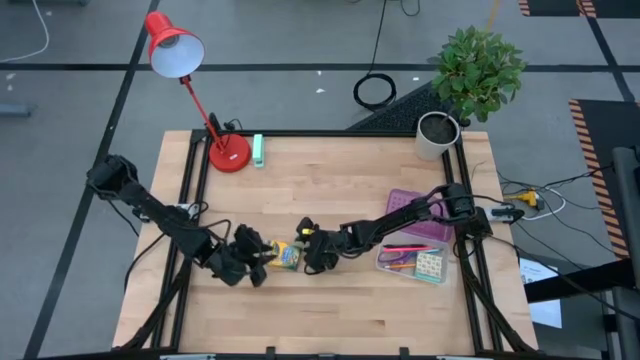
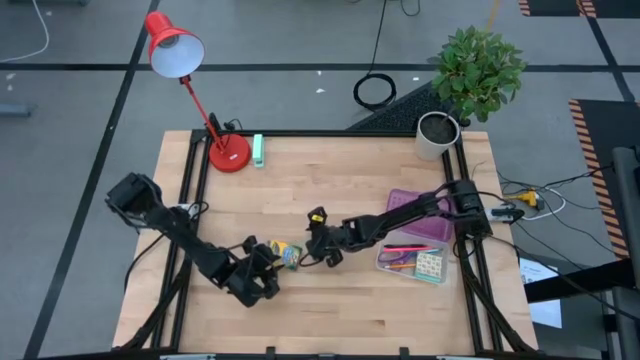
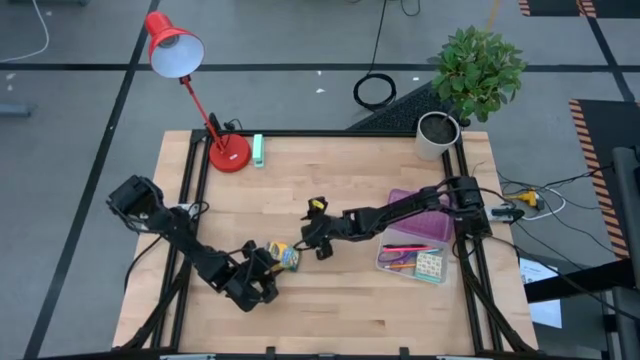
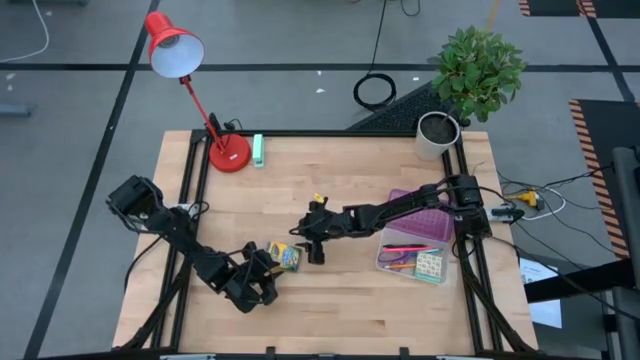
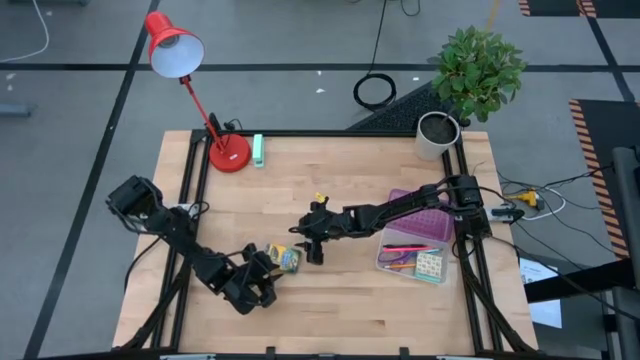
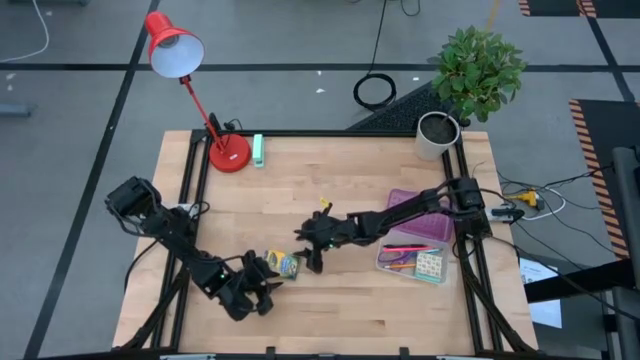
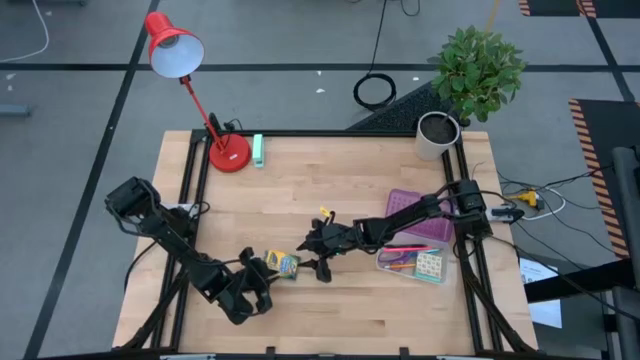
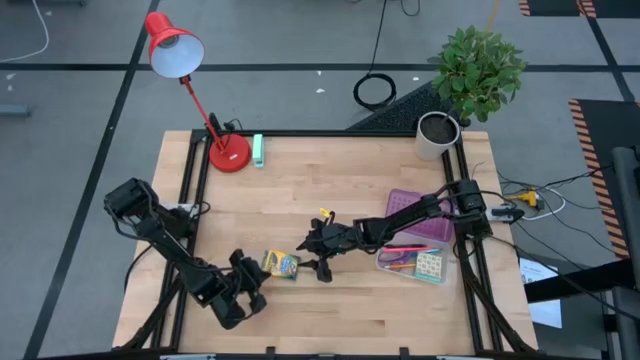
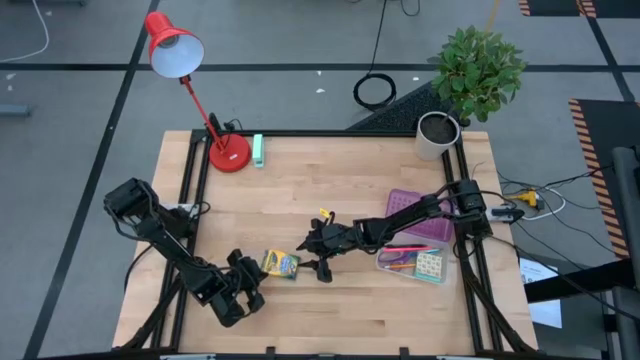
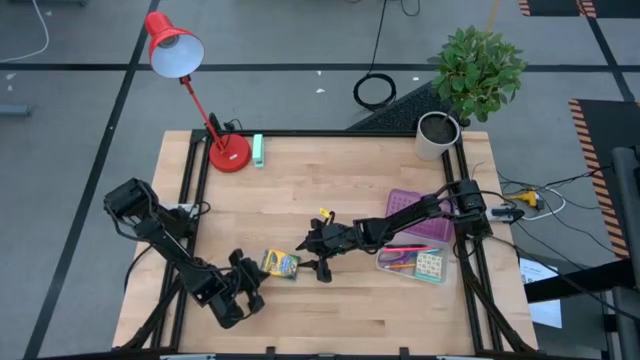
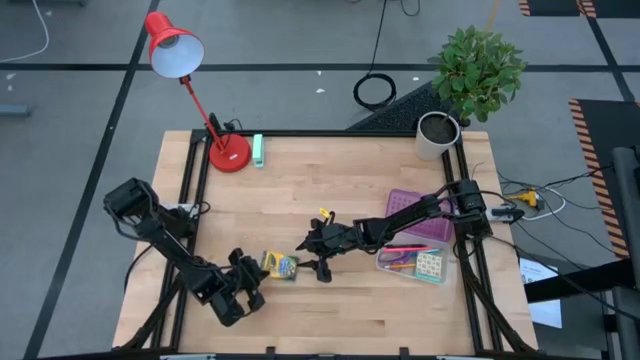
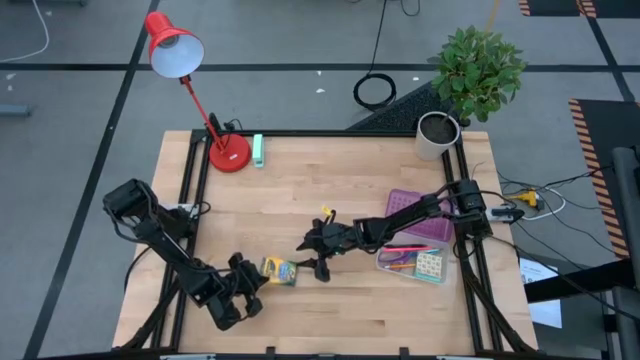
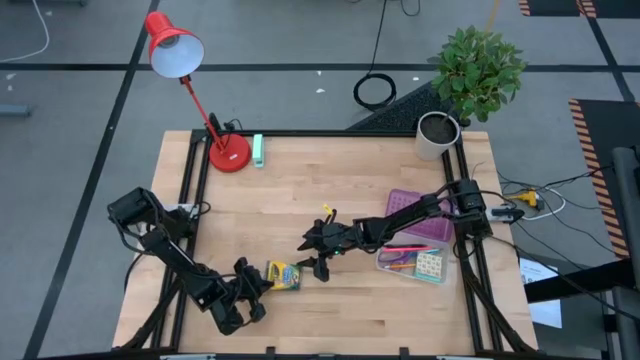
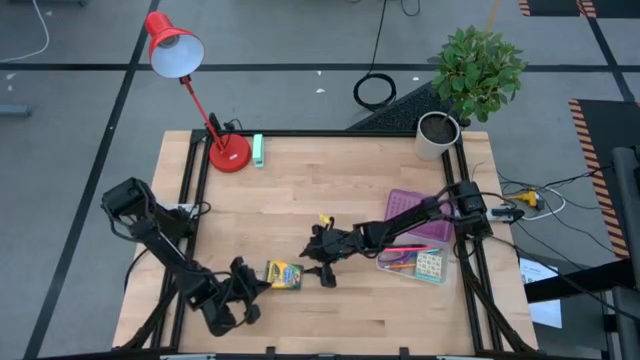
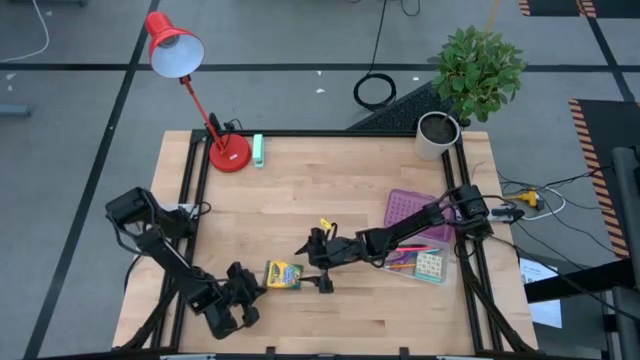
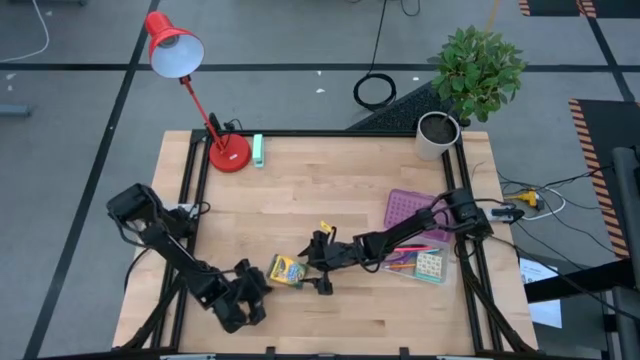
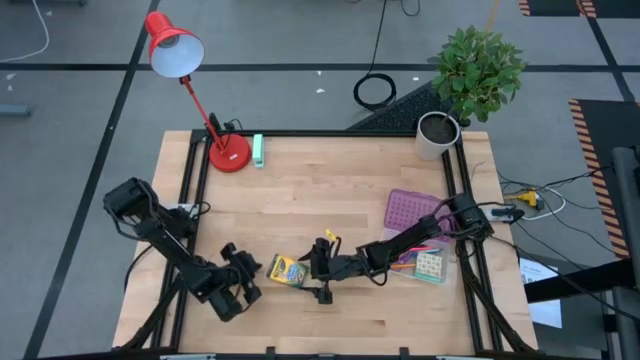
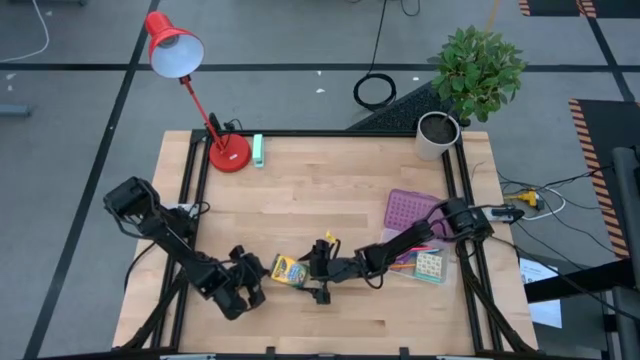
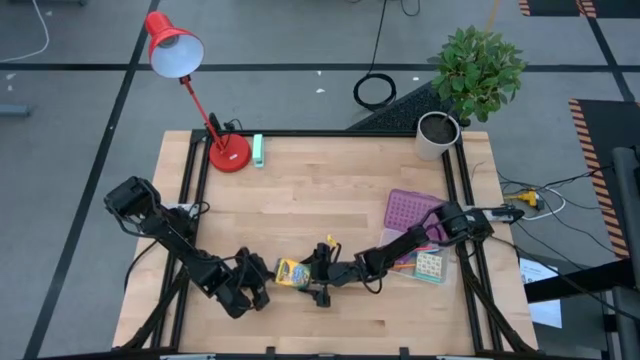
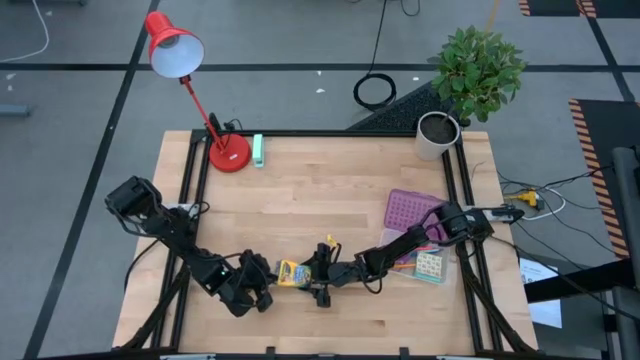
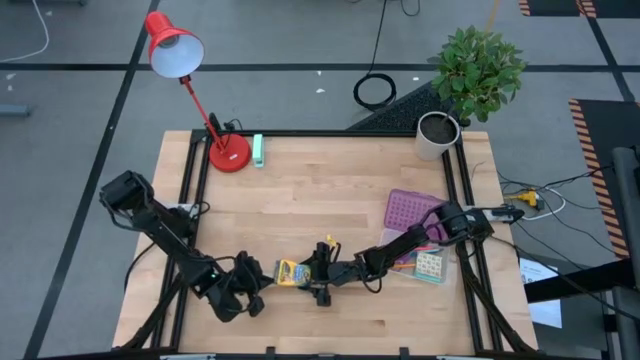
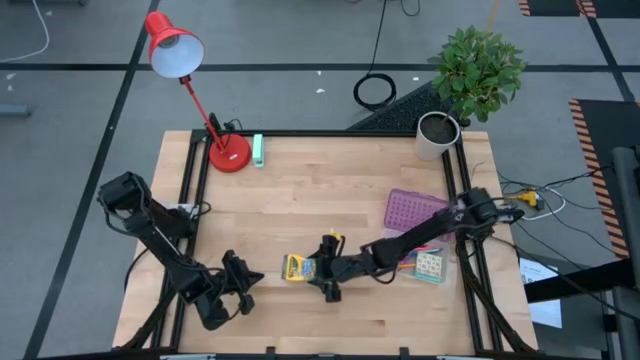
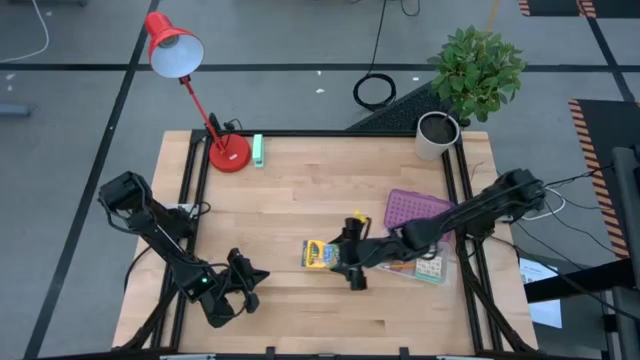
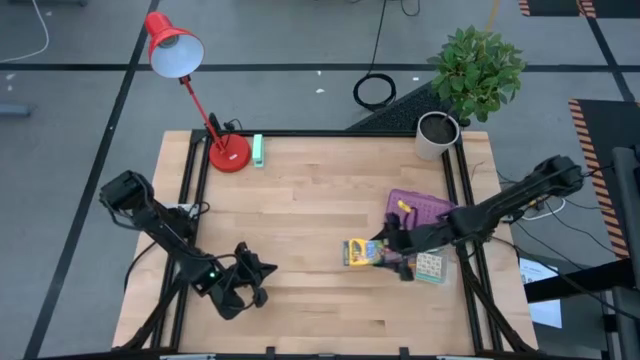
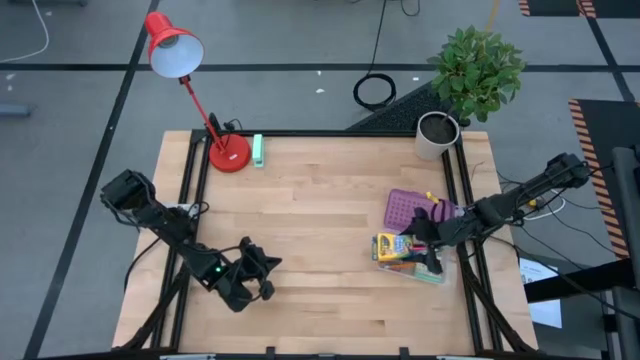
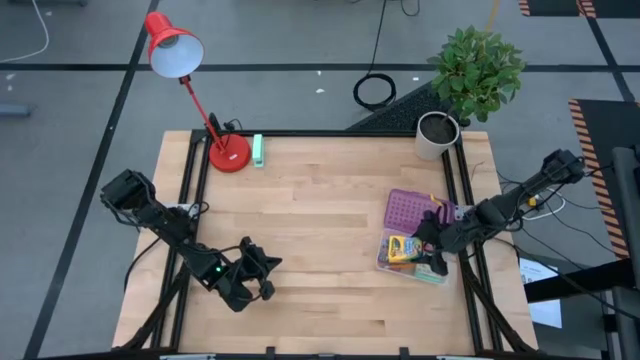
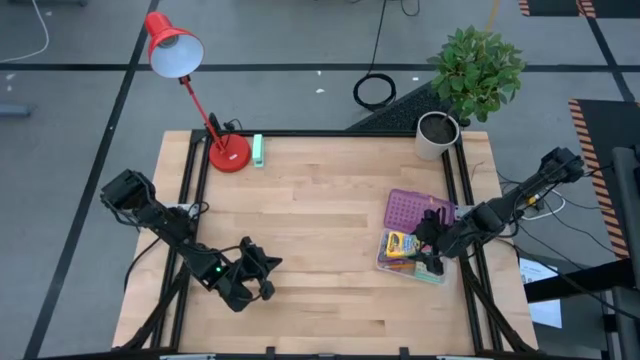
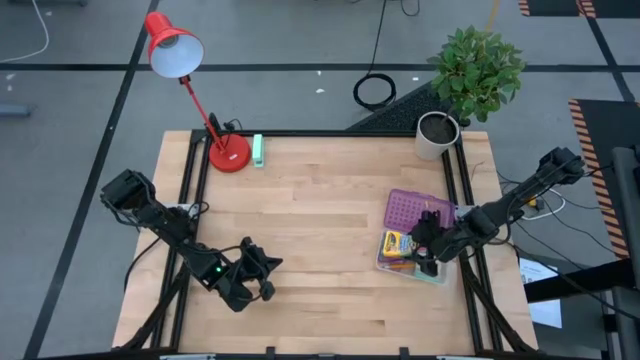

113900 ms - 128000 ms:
Task: Pack school essentials
Put the crayon box into the supply box

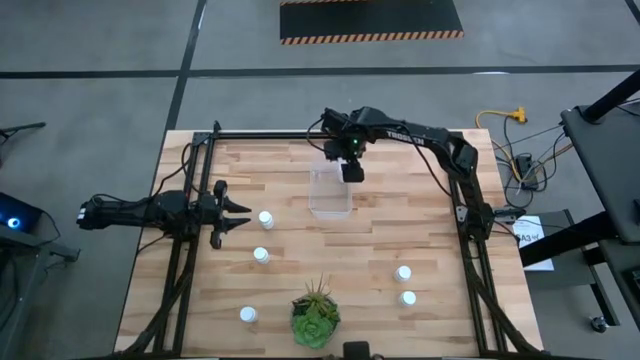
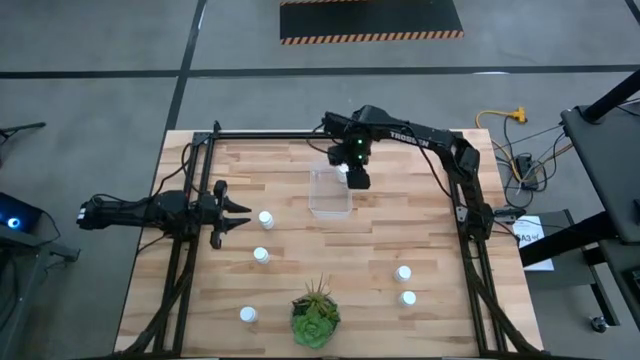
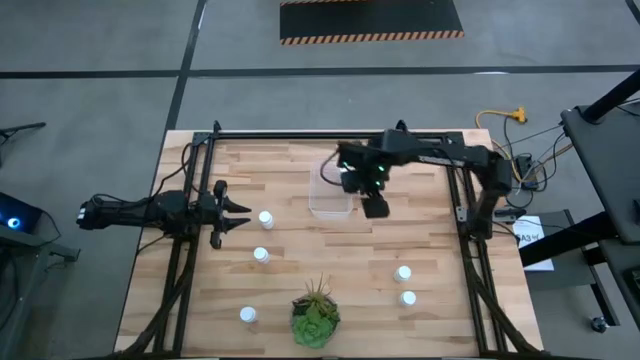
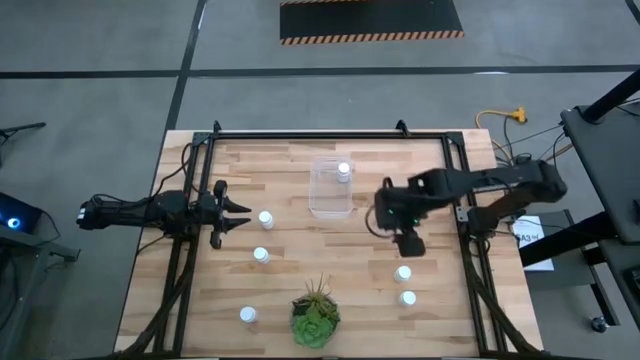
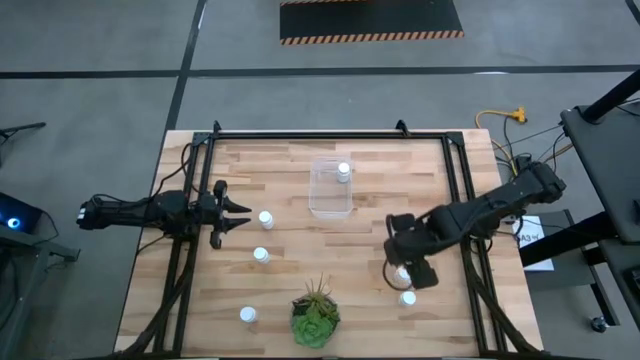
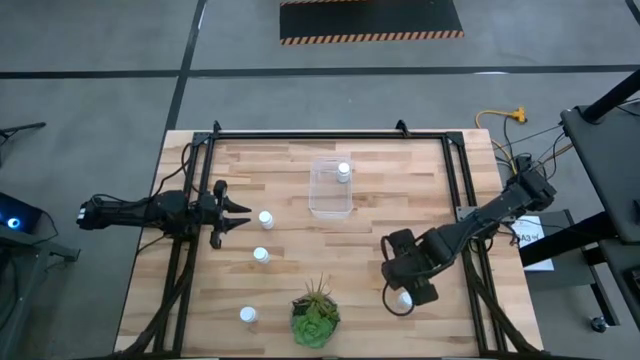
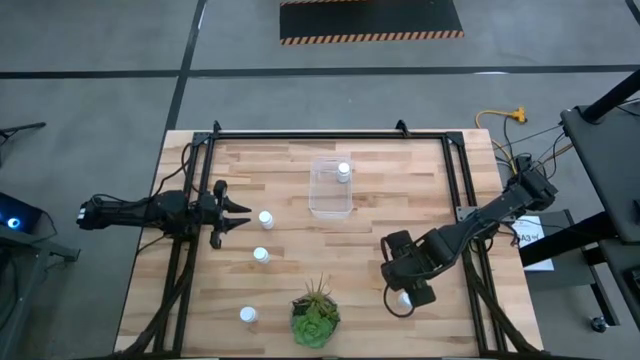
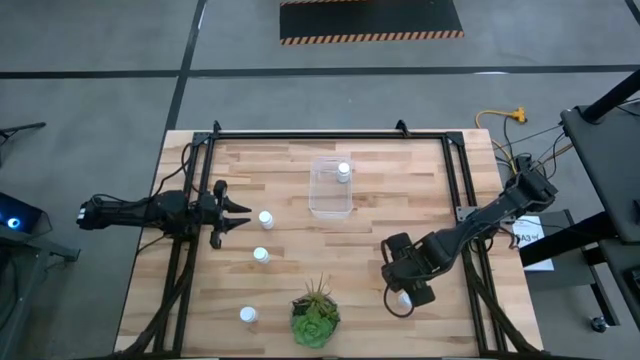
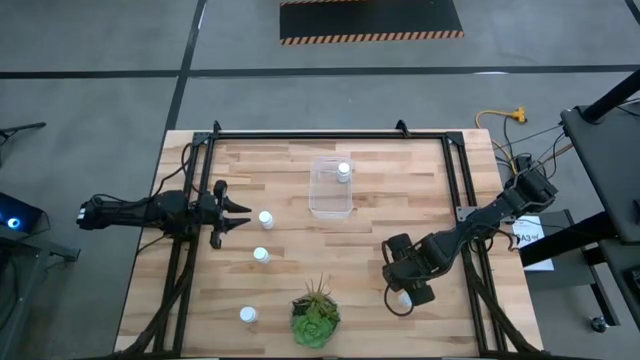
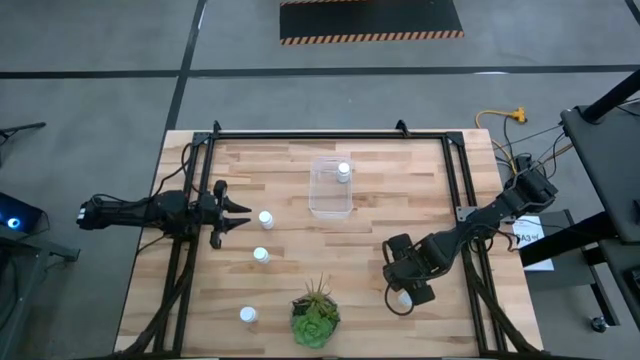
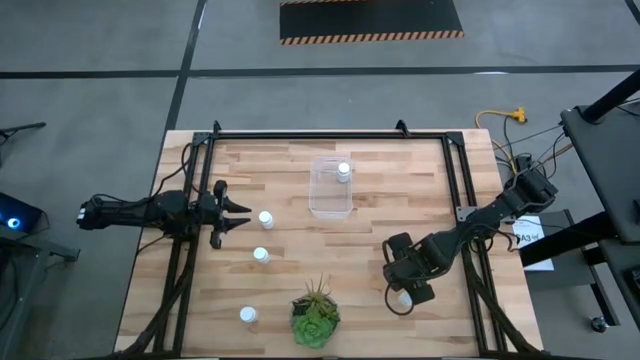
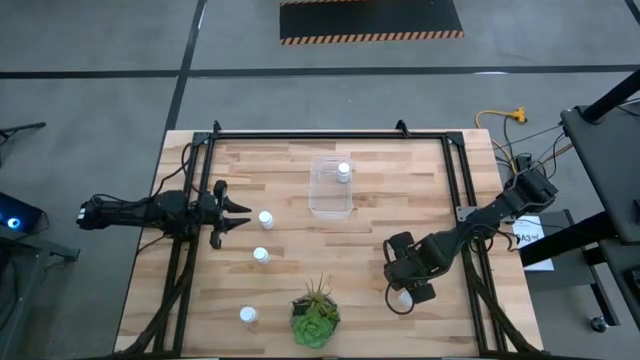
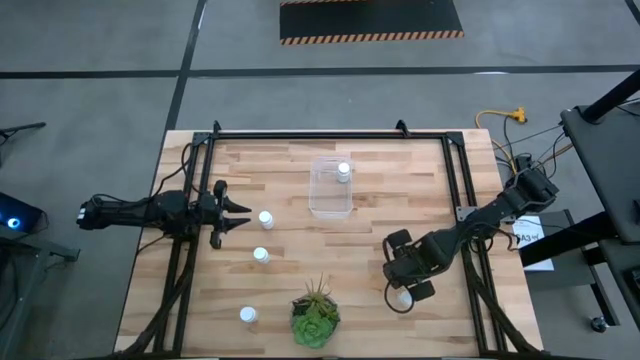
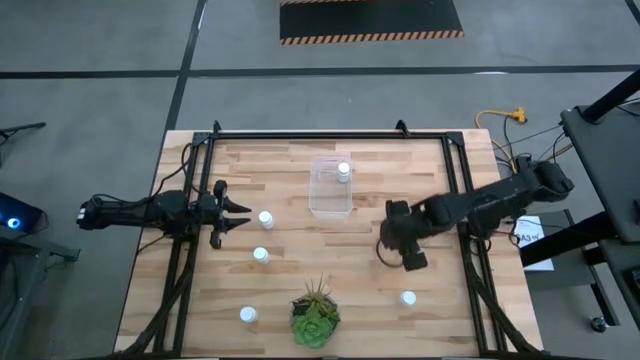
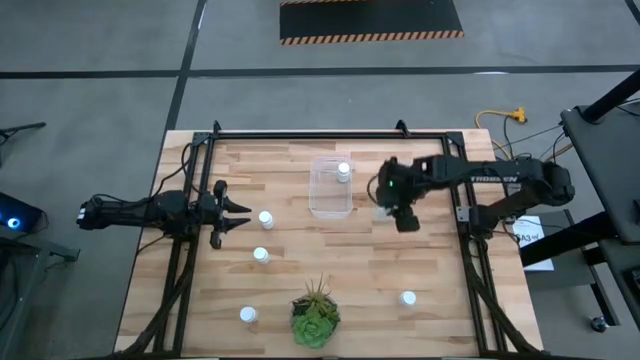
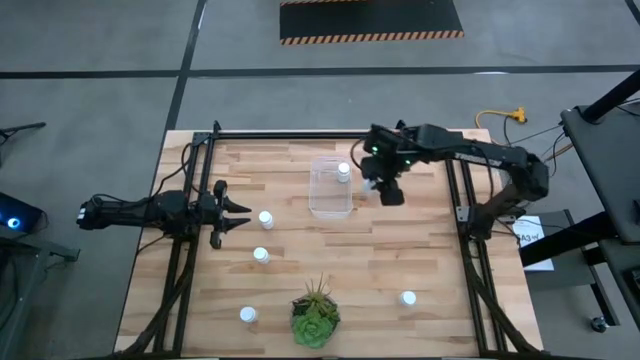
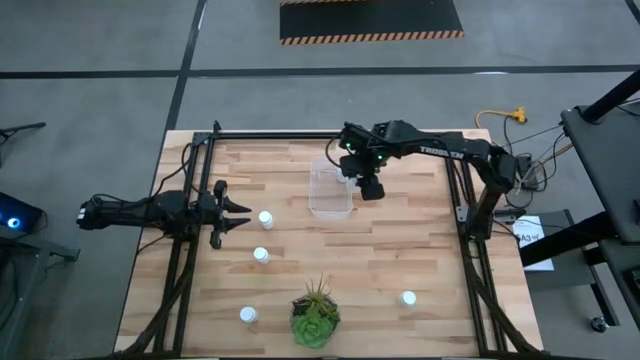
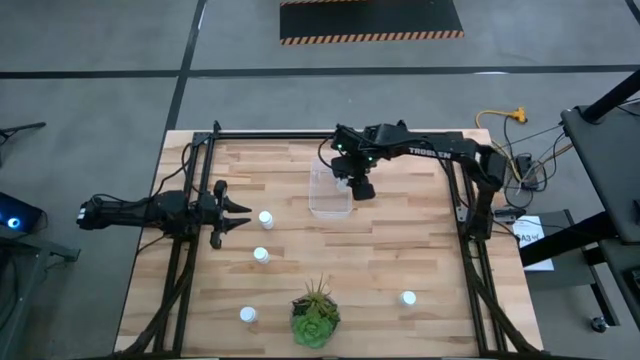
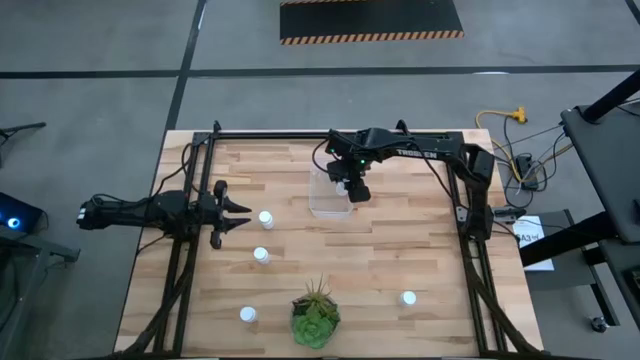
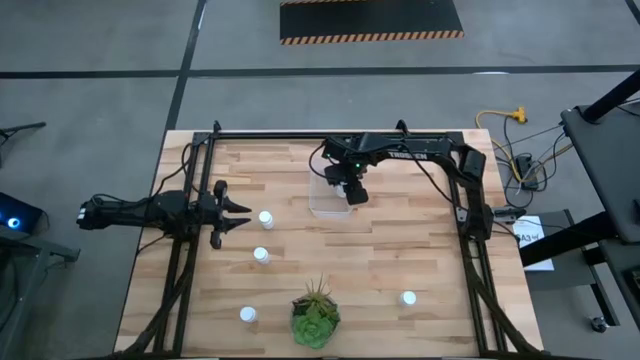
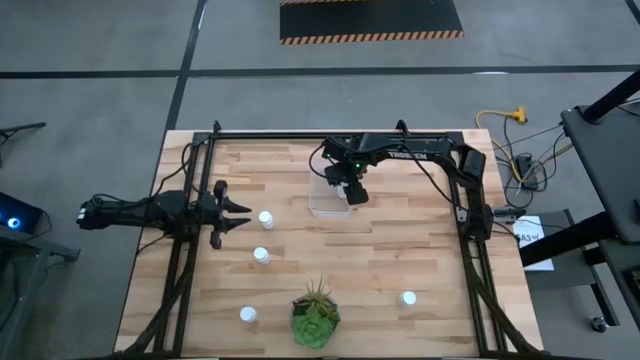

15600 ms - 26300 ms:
Task: Pick and place pill bottles into a basket
Put the white pill bottle into the transparent bin
